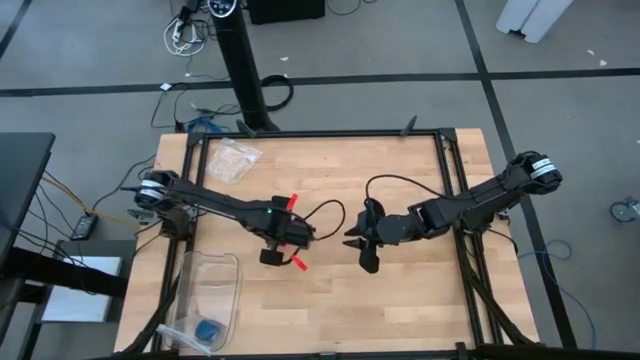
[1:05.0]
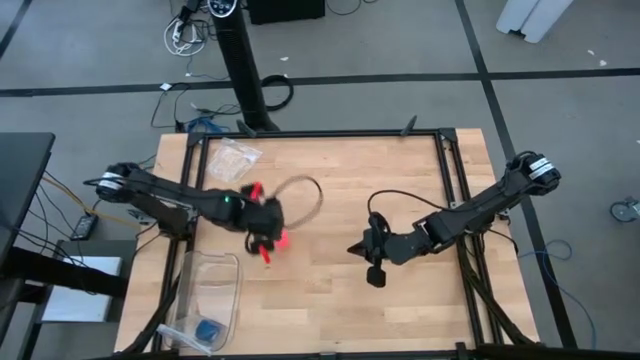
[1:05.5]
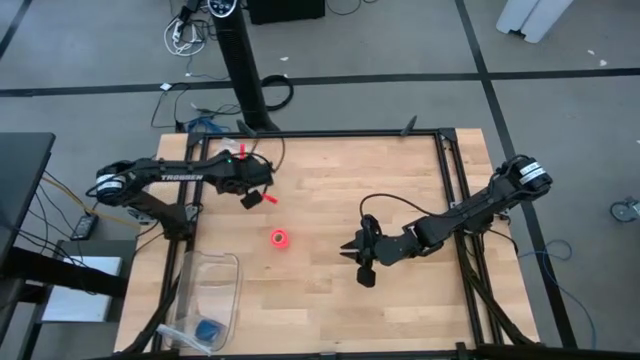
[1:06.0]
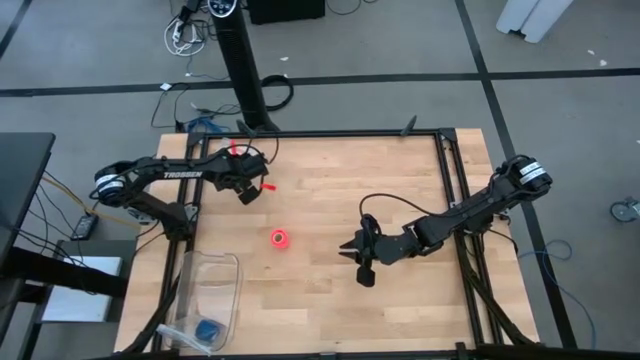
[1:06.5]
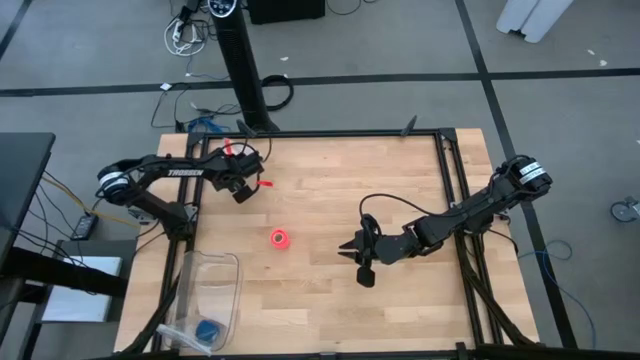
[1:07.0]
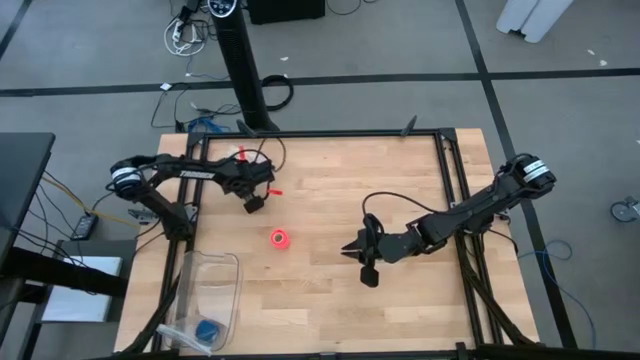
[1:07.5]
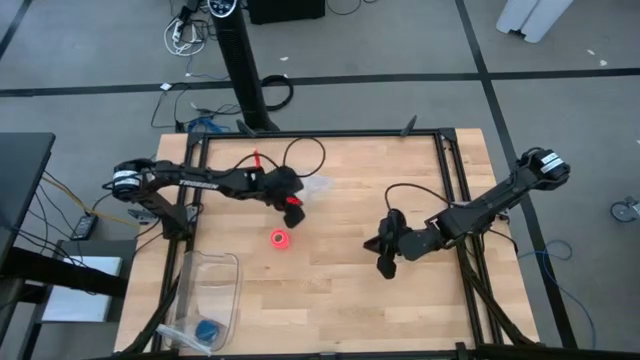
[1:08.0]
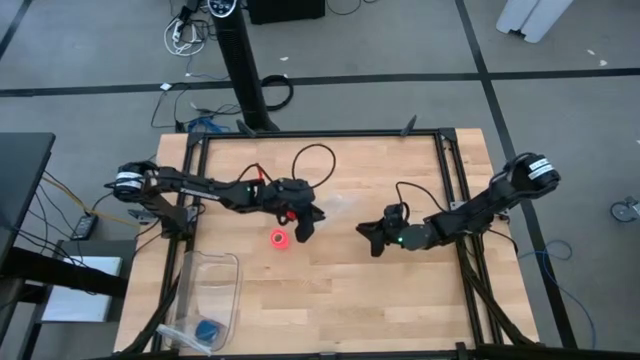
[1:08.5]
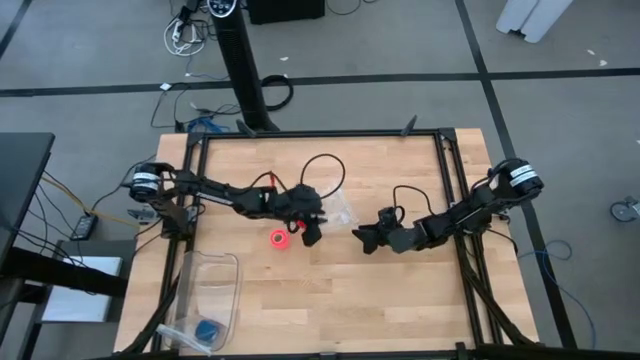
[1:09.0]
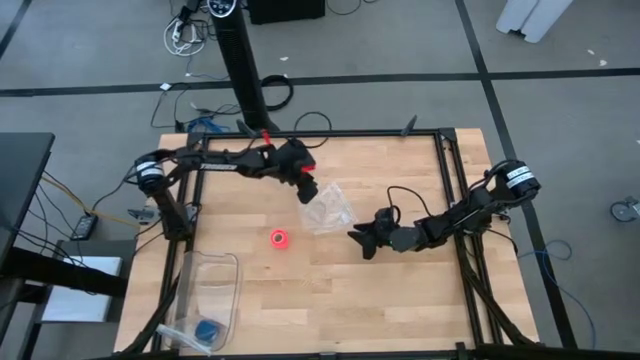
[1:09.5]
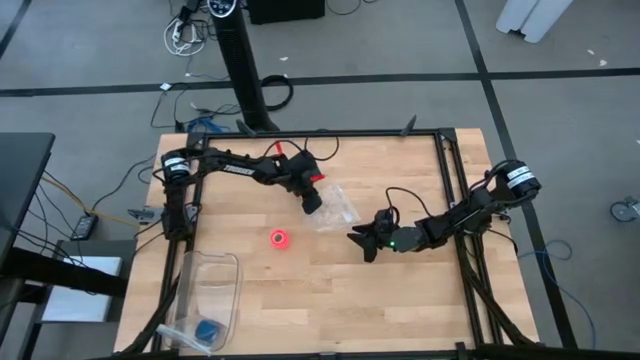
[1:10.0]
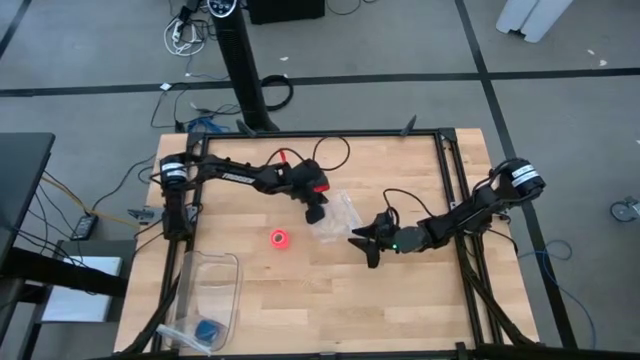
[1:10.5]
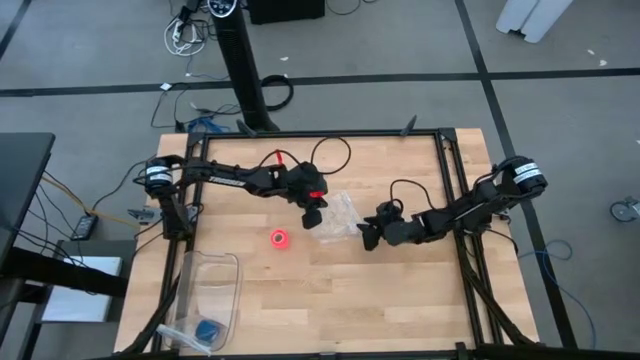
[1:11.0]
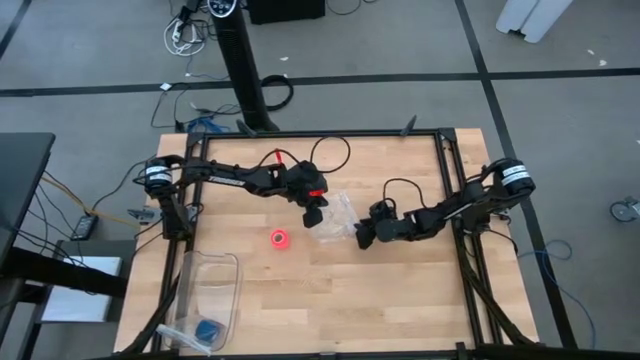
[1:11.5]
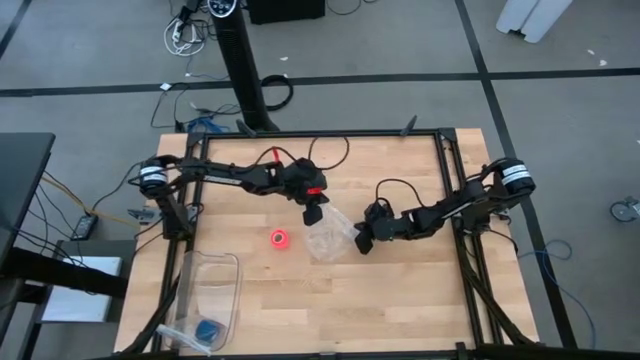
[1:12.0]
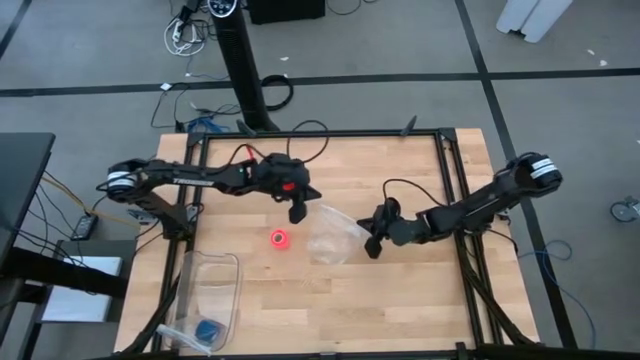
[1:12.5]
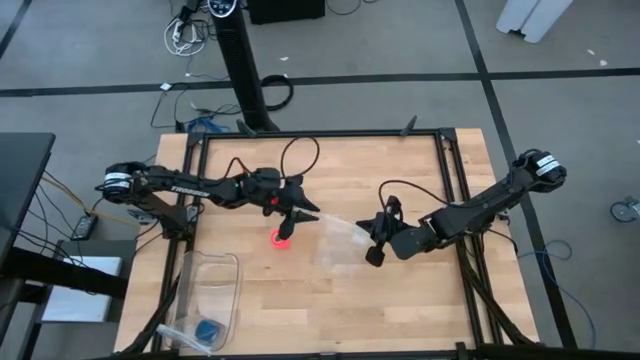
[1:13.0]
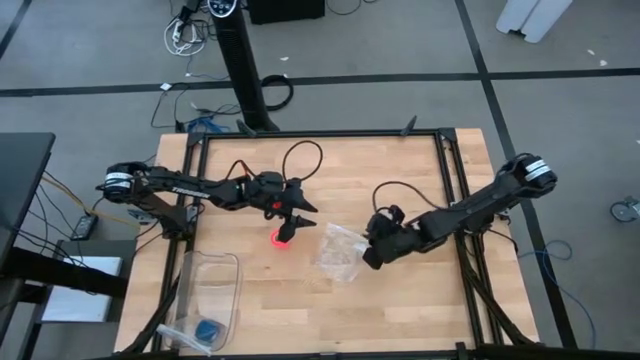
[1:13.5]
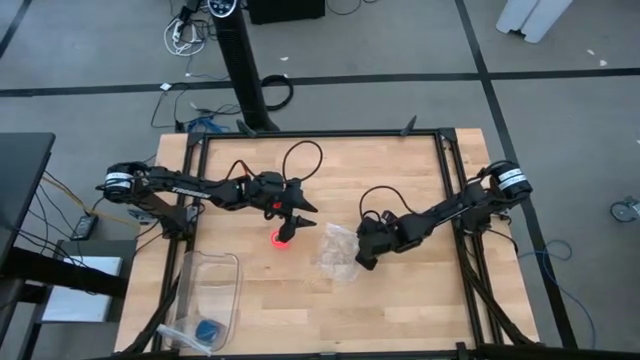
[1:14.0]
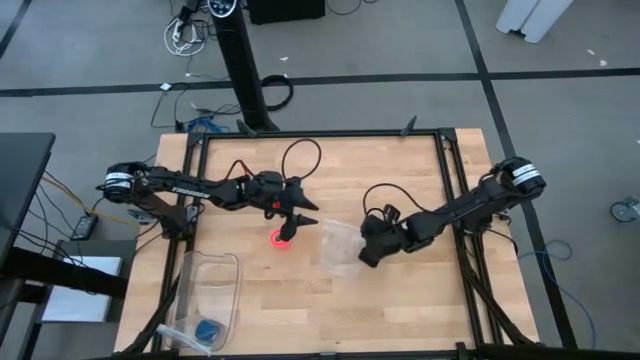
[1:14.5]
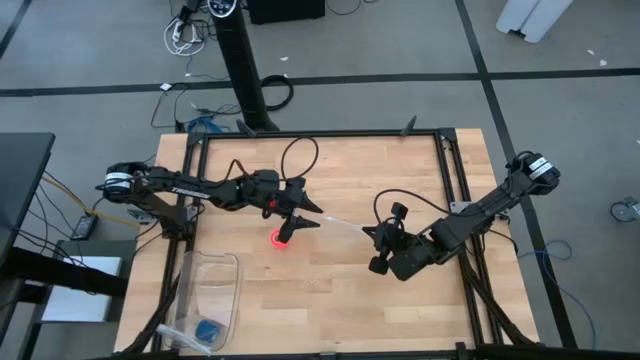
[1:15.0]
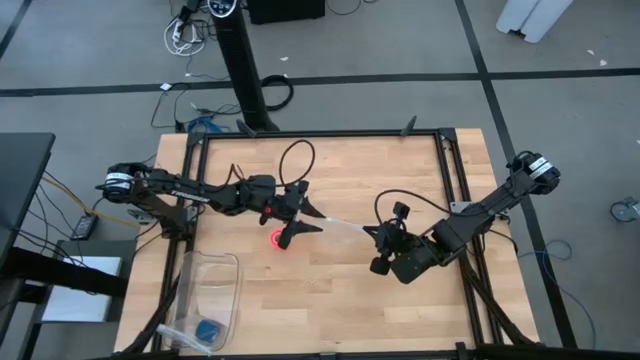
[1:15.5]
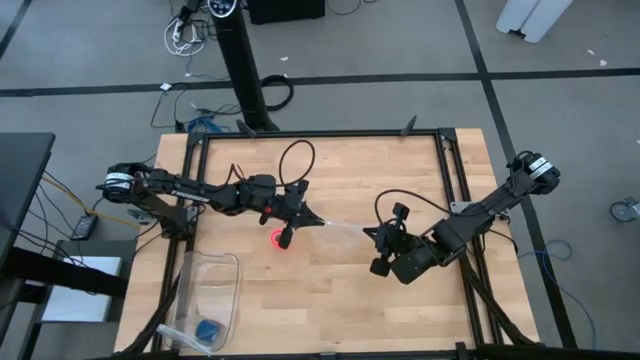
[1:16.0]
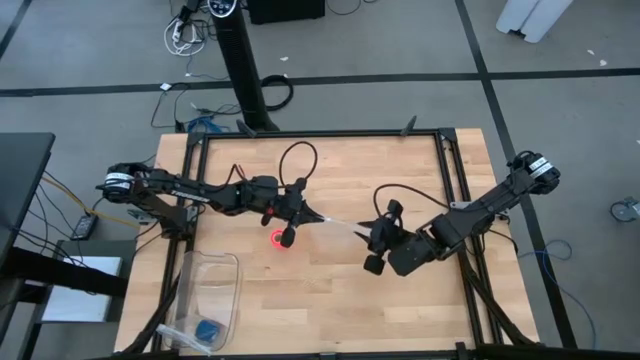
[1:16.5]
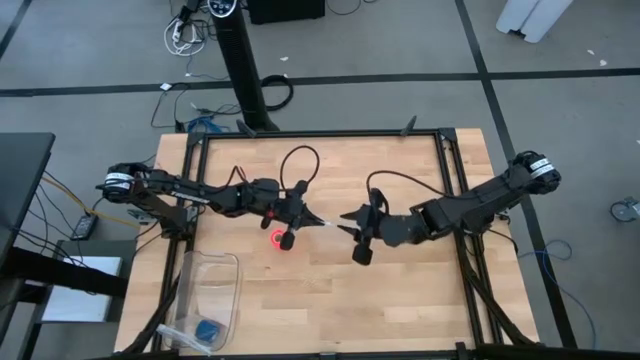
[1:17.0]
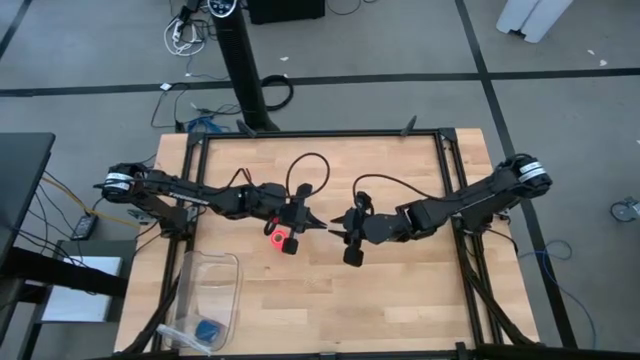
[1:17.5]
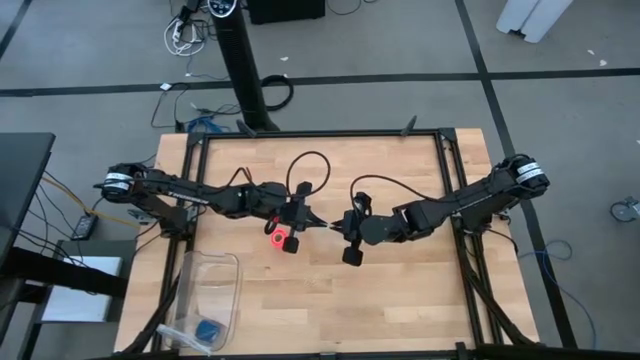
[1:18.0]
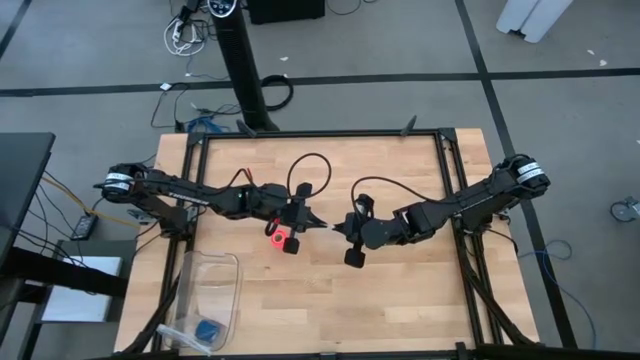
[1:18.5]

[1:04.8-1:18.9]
Task: Roll bandage
Open the zip lock bag

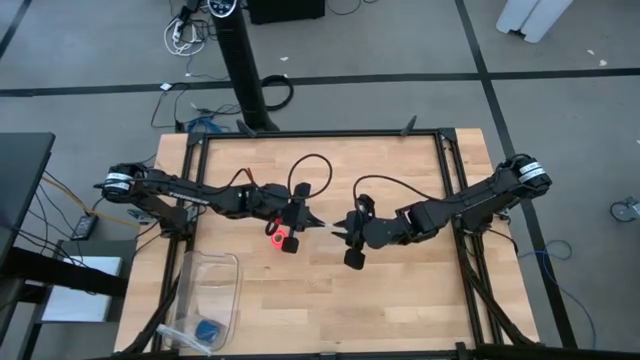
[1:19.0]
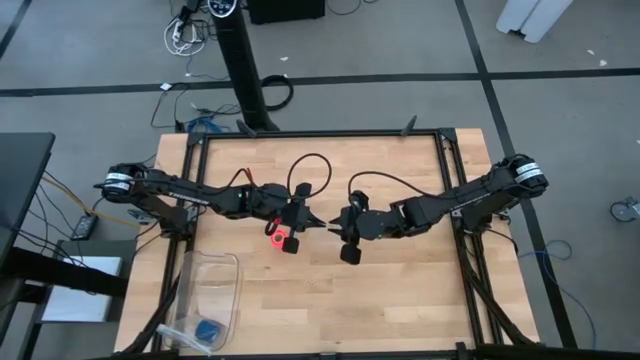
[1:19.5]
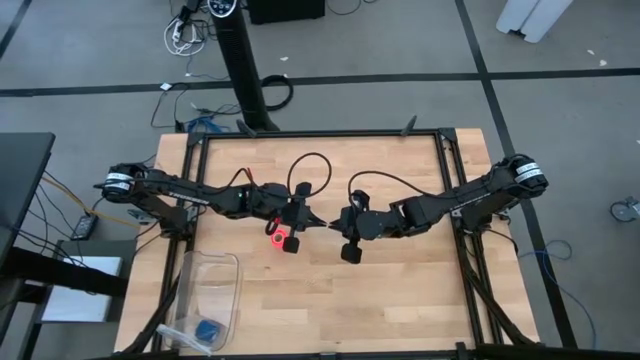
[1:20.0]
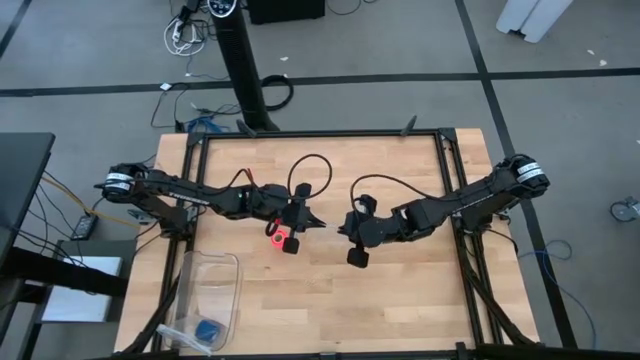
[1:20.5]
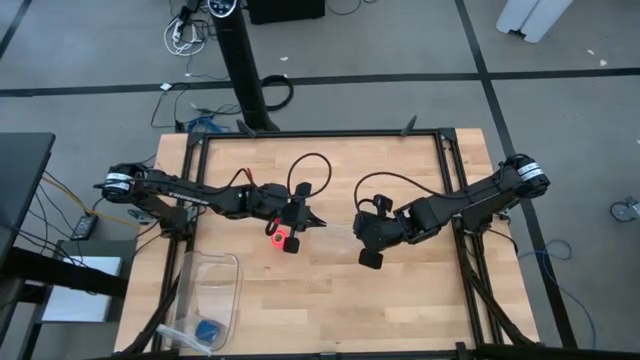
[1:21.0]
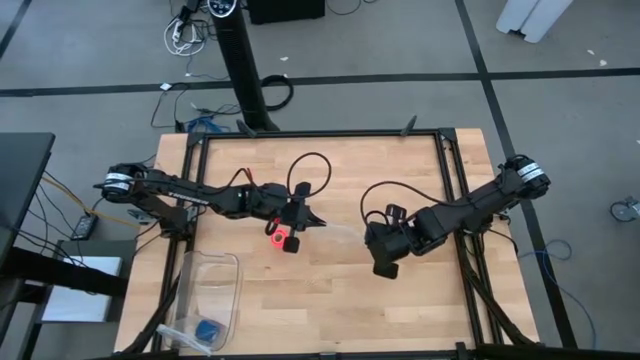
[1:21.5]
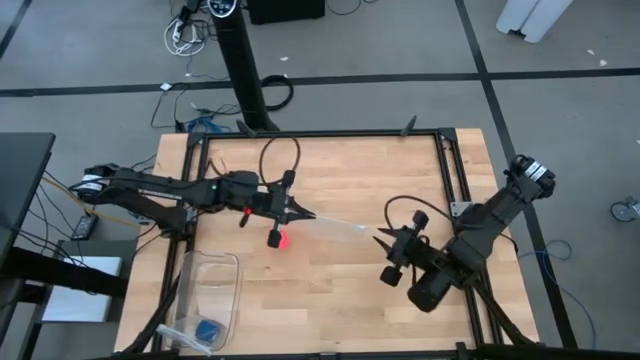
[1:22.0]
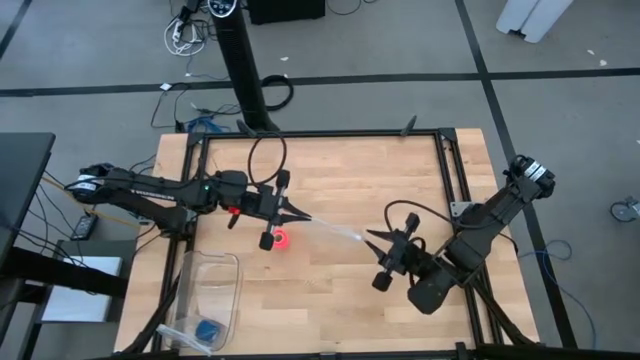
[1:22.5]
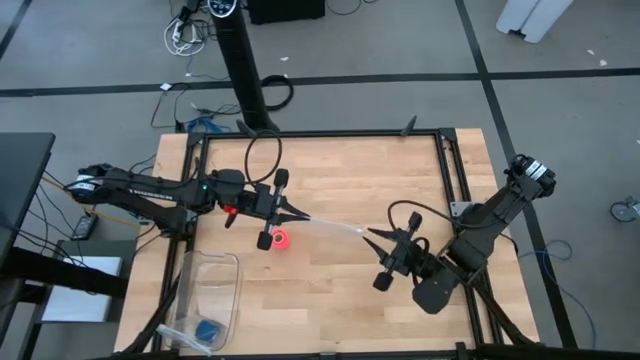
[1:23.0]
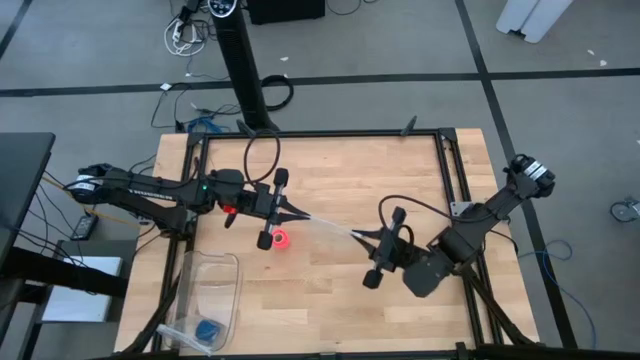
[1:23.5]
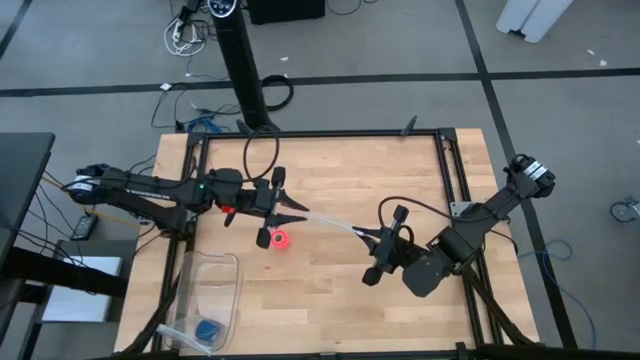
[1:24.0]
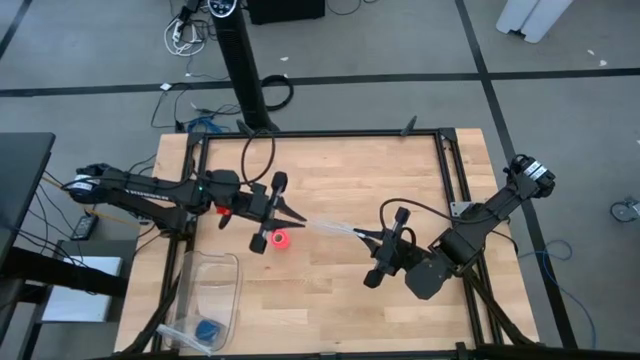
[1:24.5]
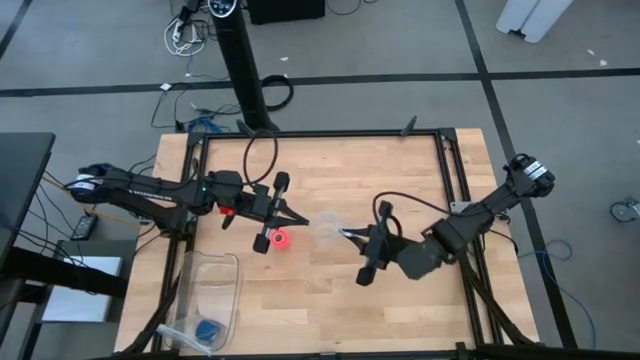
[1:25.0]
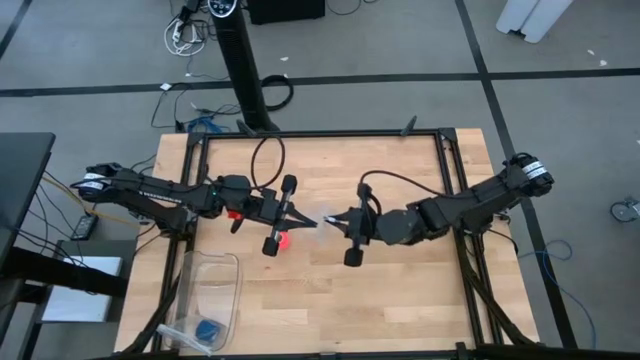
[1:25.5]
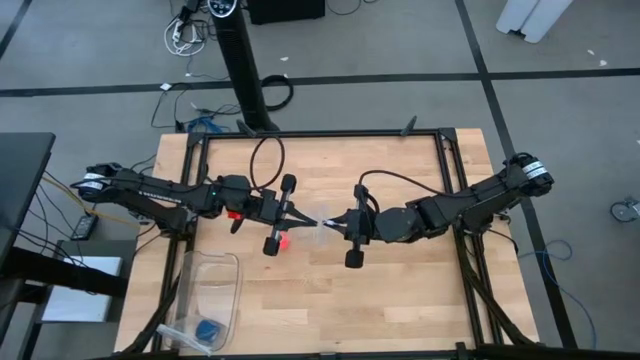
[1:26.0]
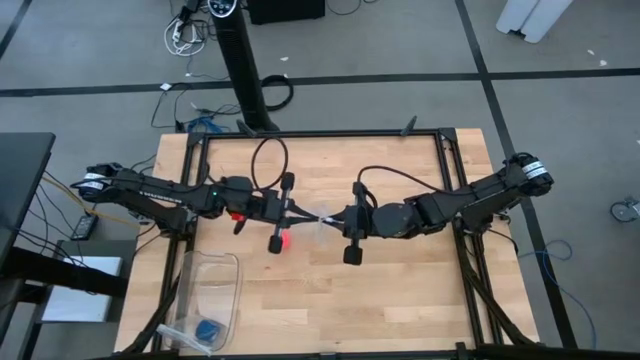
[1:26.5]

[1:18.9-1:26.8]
Open the zip lock bag
